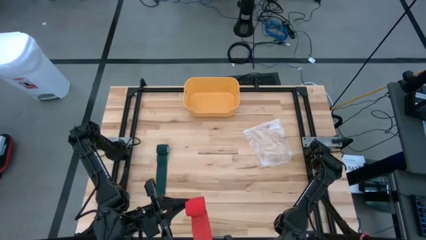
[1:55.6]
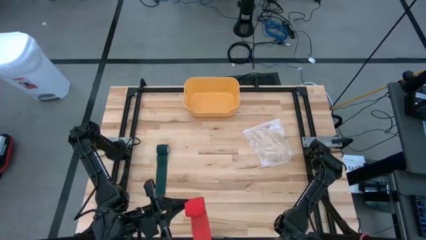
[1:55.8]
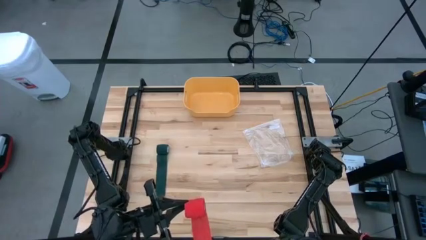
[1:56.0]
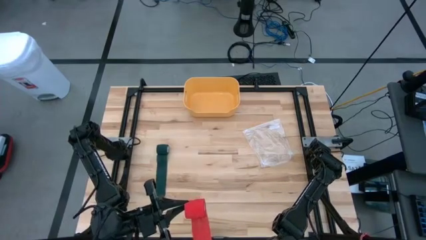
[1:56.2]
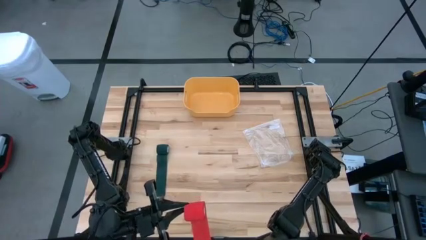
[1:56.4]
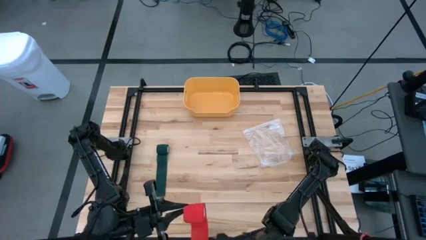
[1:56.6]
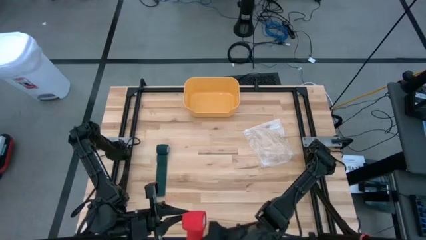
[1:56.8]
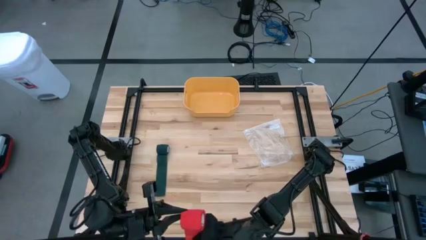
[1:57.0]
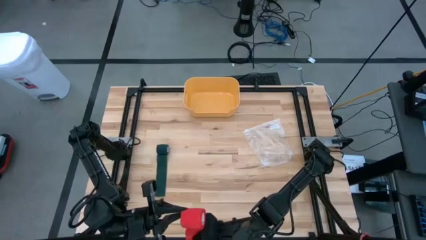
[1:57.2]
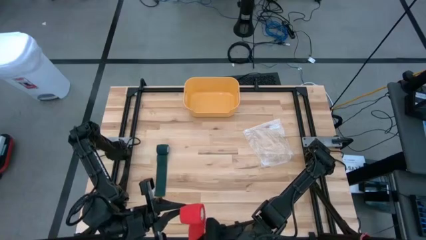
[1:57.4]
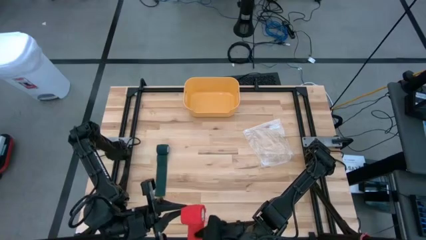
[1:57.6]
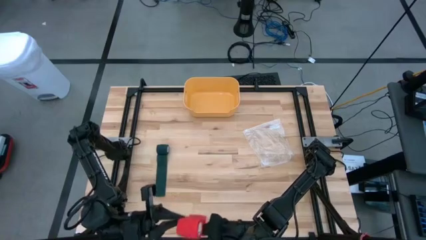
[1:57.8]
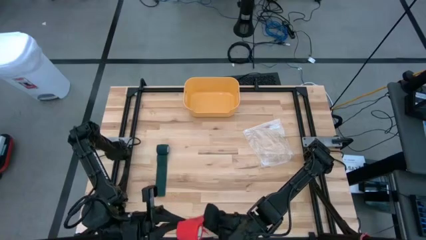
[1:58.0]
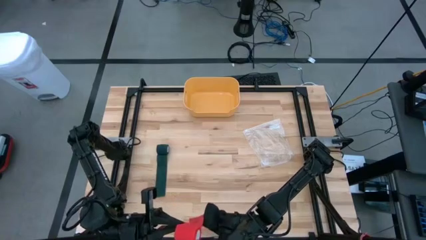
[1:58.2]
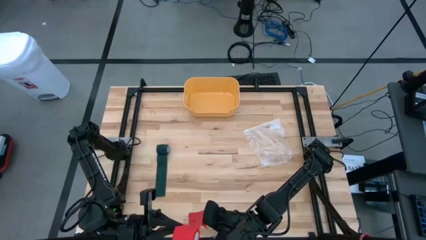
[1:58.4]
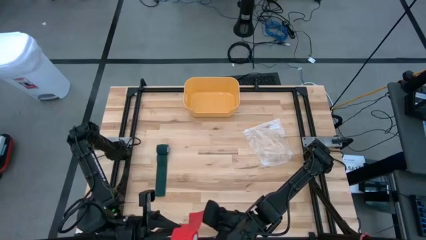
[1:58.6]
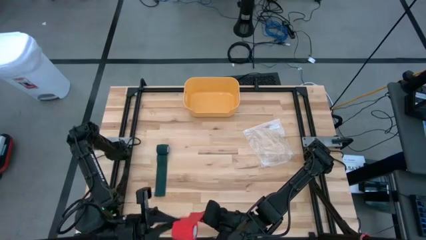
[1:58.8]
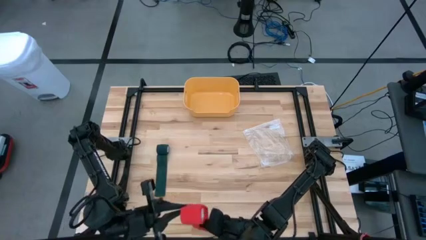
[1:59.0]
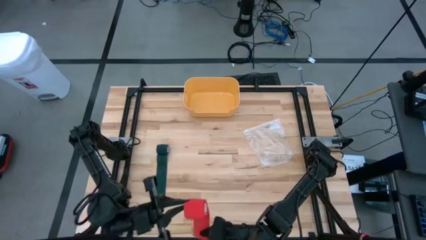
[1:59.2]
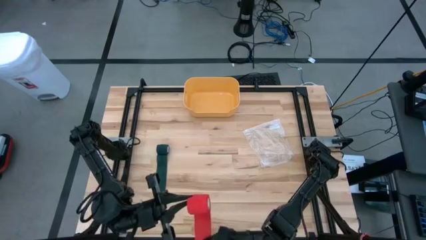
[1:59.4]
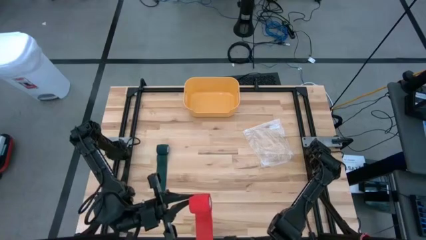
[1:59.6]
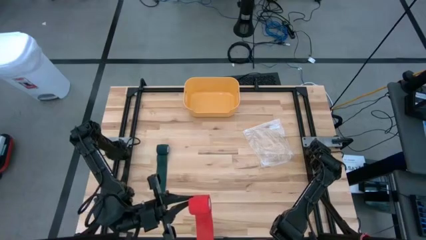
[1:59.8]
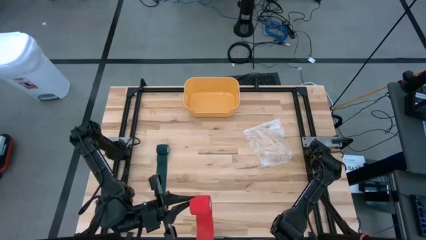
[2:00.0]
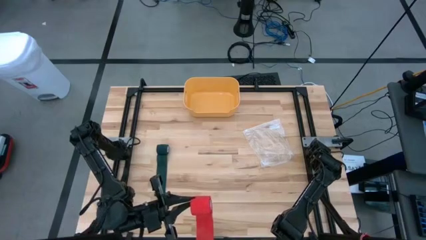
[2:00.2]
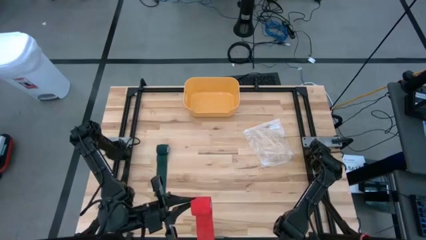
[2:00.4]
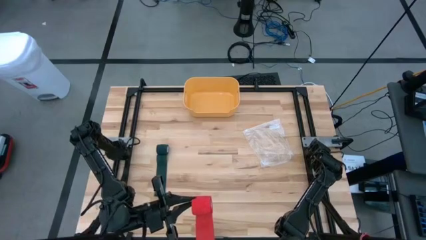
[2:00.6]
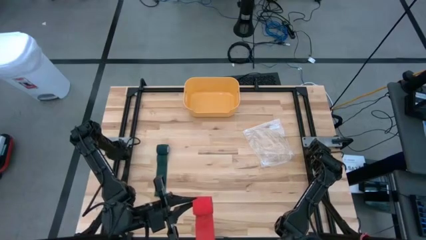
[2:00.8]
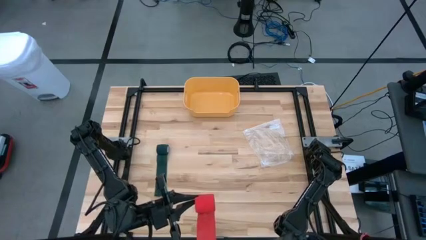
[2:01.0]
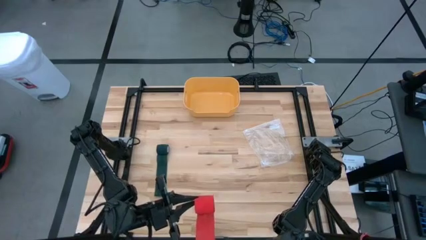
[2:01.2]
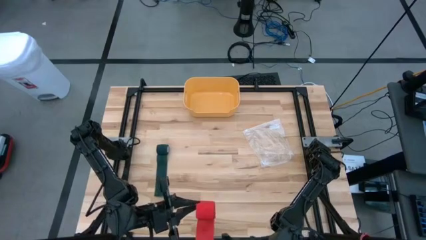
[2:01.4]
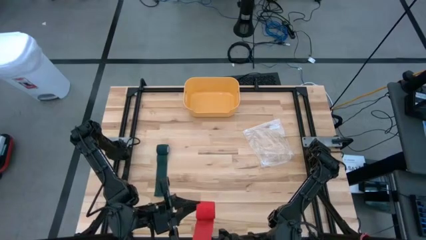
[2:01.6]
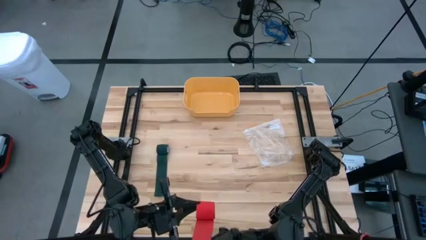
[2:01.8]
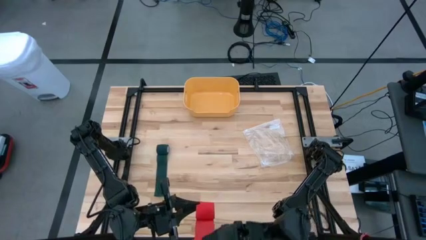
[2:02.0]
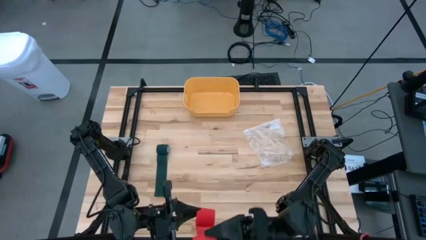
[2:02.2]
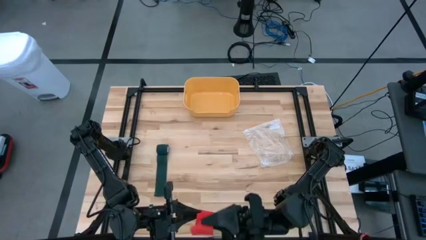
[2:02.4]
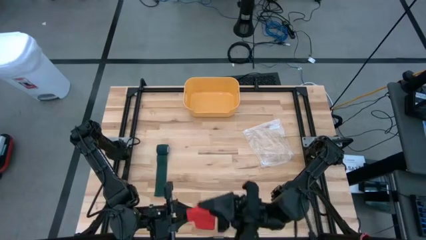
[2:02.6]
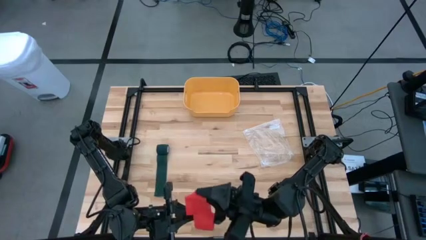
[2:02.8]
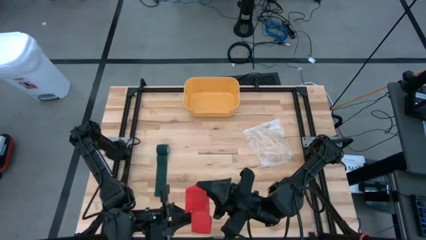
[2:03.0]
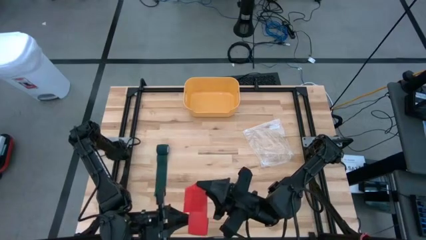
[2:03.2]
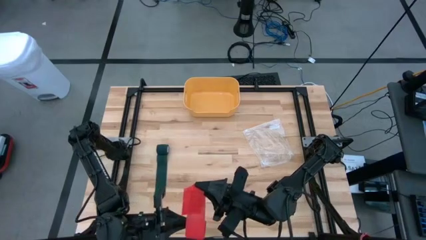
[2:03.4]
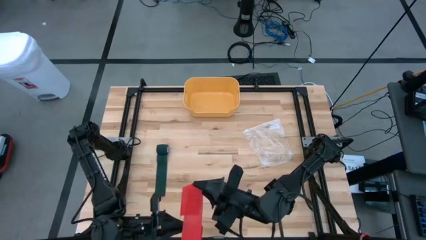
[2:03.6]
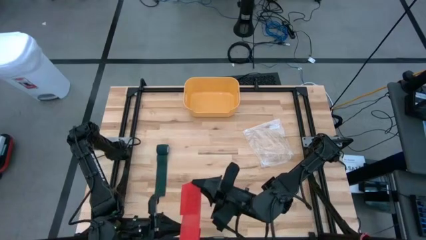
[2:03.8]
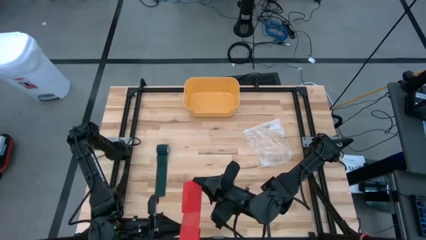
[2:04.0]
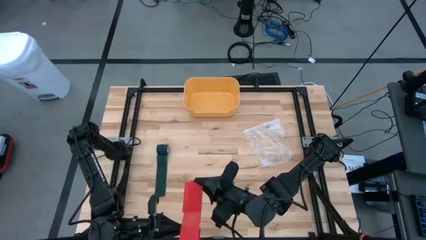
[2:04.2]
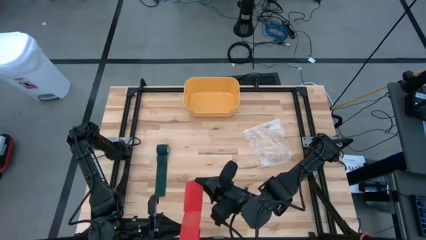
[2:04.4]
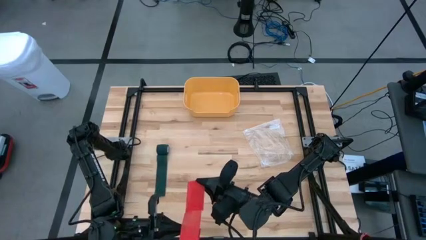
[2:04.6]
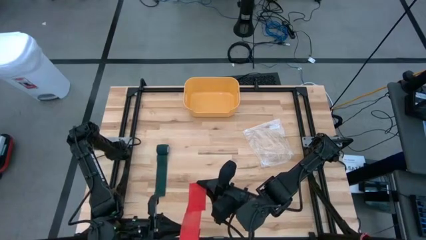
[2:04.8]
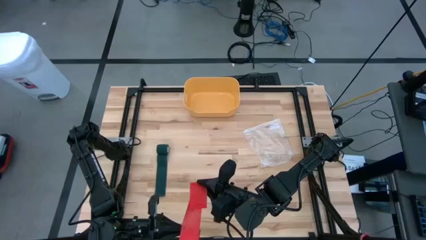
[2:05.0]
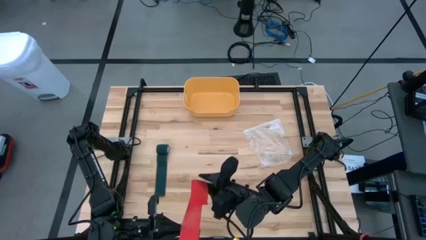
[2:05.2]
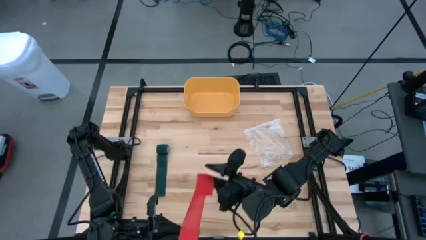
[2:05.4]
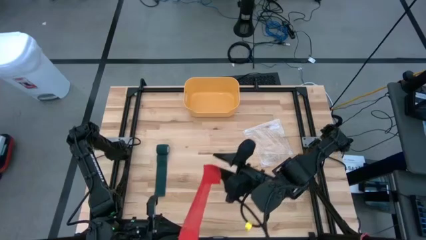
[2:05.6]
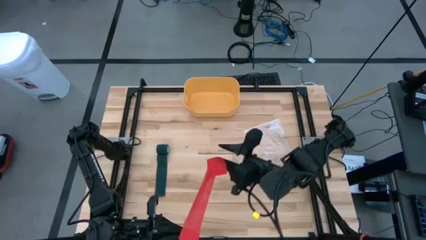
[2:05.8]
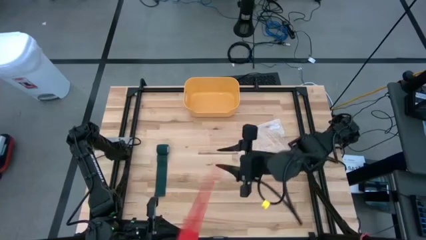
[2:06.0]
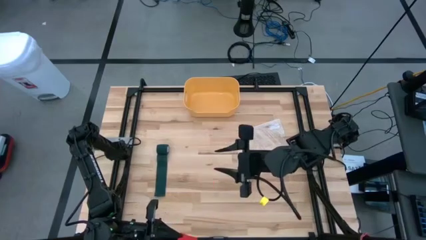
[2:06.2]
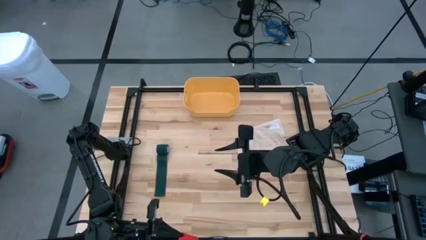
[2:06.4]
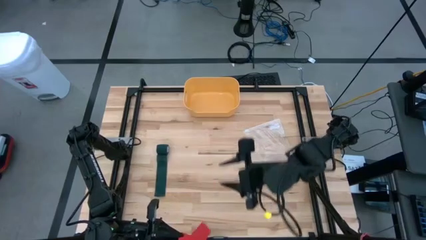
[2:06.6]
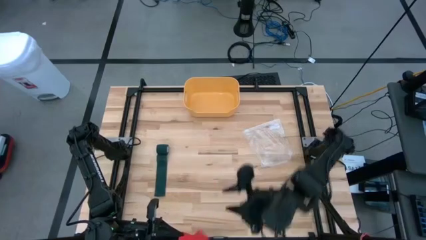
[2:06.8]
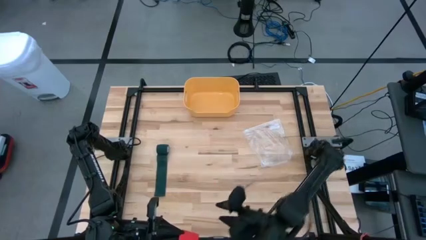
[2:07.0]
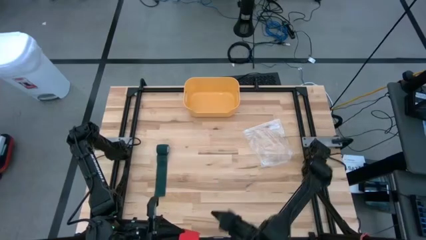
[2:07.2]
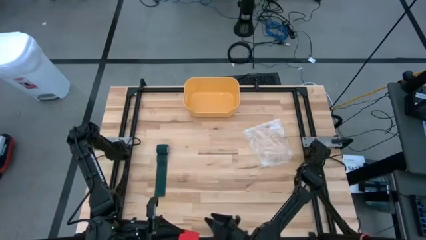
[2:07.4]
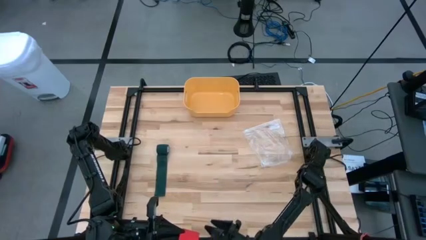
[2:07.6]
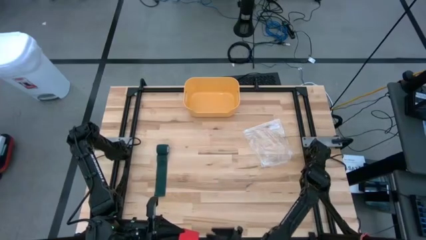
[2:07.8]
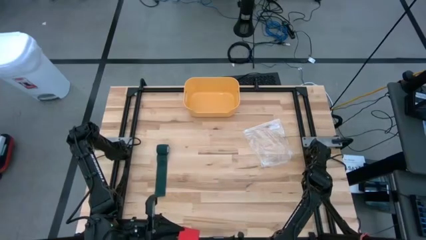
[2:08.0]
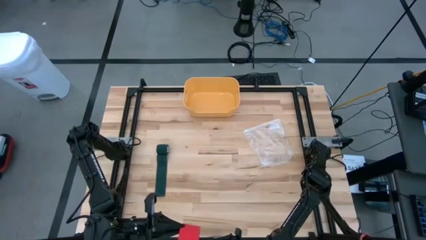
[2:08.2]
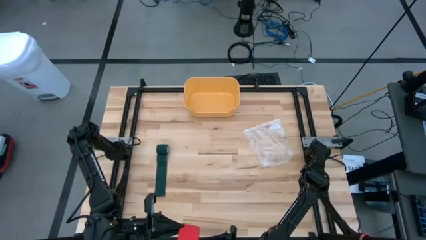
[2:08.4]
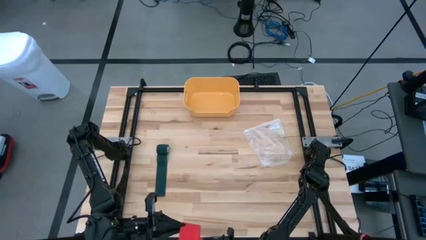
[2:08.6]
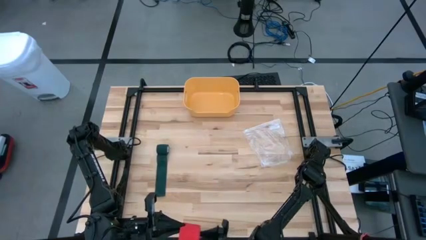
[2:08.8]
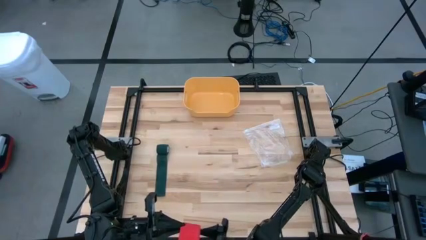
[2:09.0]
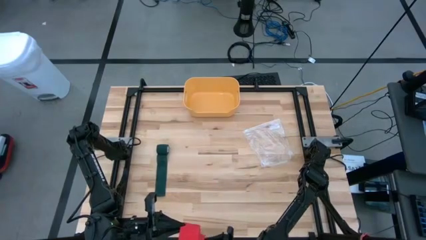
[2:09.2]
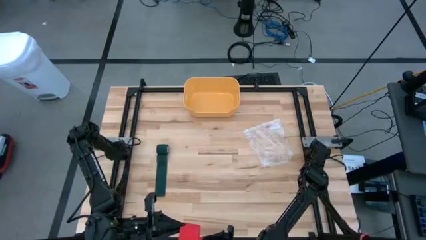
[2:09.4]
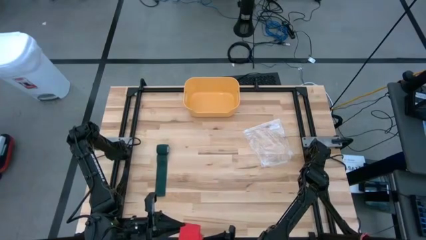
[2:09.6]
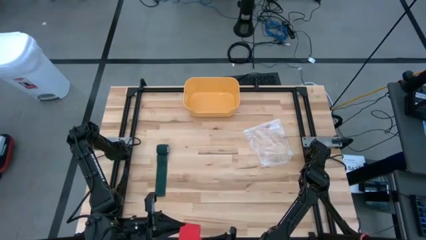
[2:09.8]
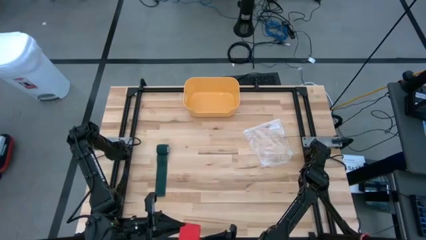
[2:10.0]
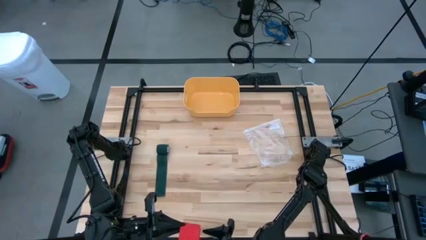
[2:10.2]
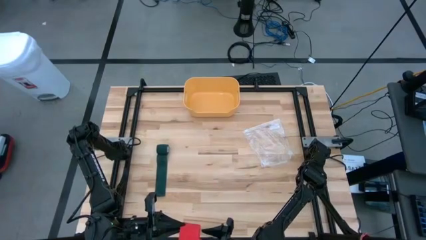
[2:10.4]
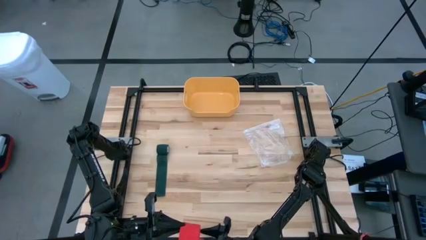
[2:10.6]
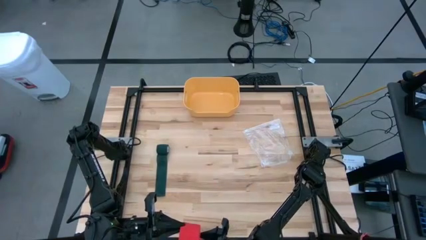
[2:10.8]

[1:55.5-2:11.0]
Task: Roll bandage
Roll the red bandage
